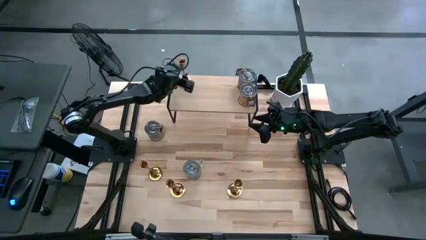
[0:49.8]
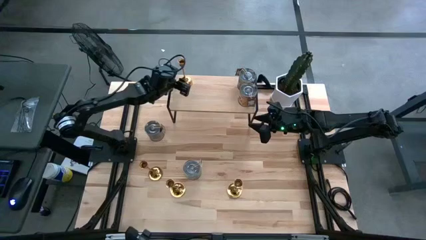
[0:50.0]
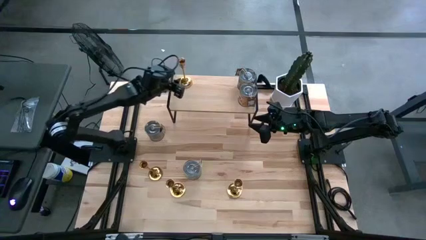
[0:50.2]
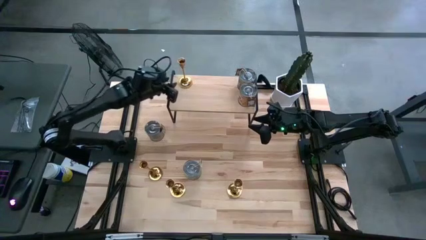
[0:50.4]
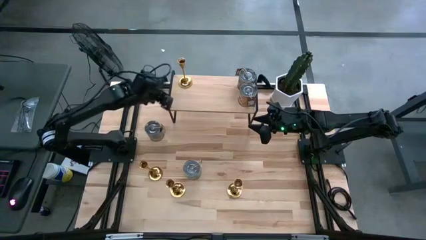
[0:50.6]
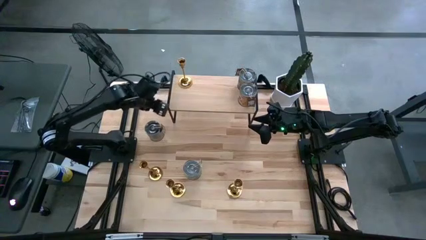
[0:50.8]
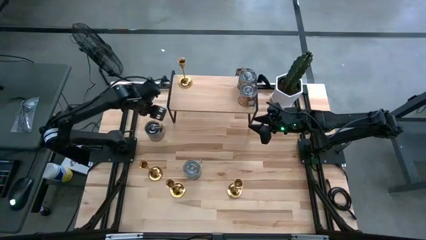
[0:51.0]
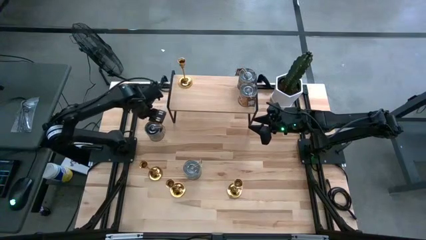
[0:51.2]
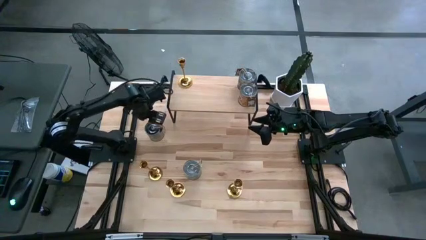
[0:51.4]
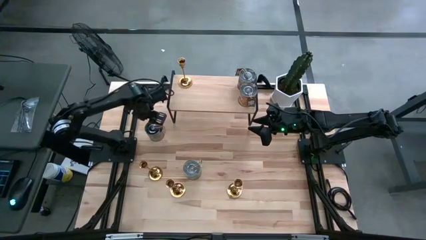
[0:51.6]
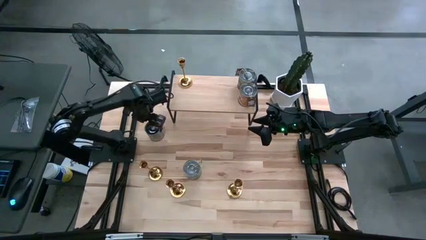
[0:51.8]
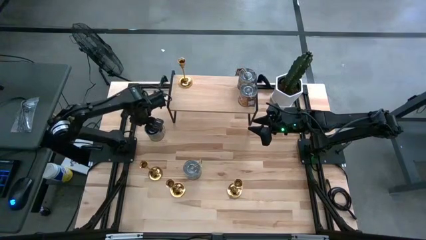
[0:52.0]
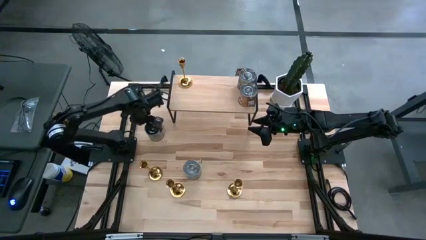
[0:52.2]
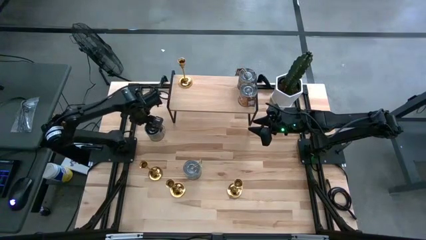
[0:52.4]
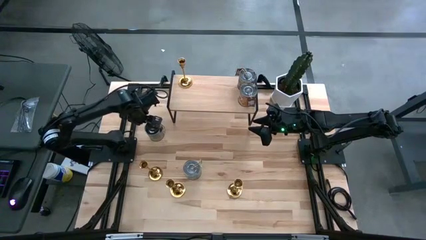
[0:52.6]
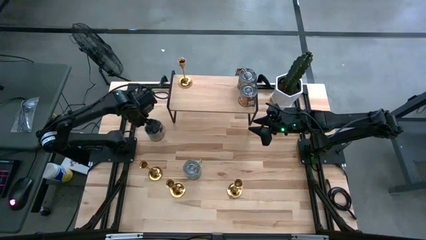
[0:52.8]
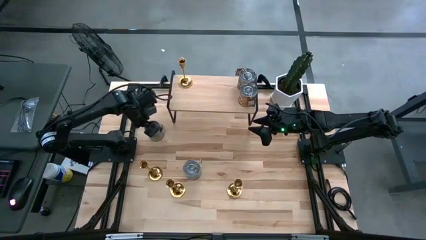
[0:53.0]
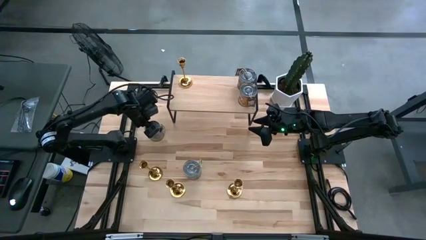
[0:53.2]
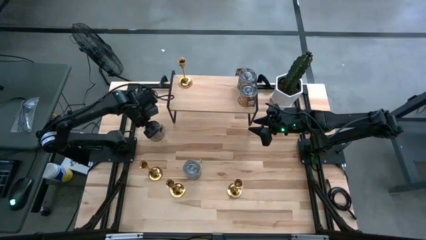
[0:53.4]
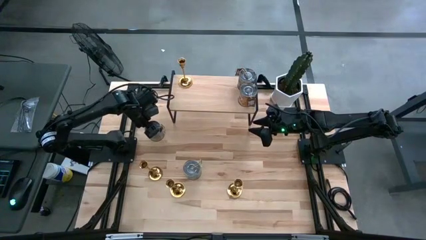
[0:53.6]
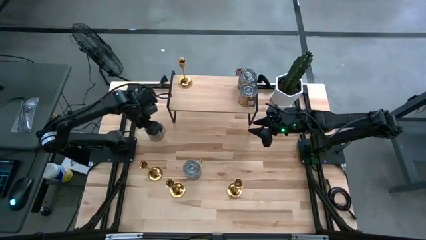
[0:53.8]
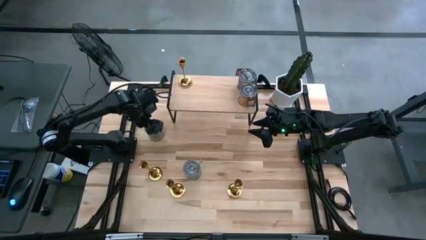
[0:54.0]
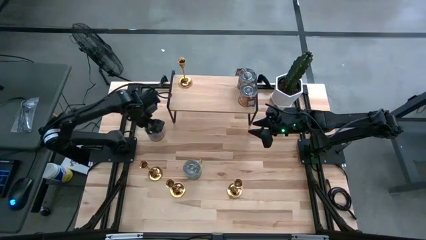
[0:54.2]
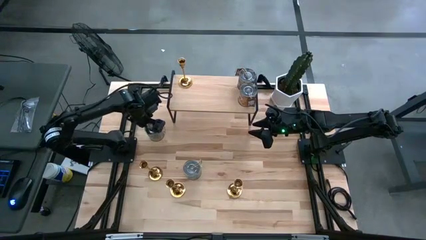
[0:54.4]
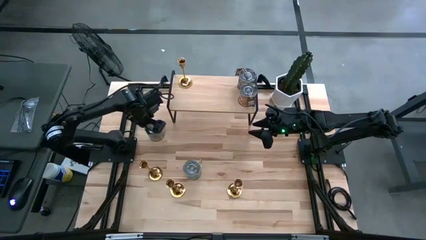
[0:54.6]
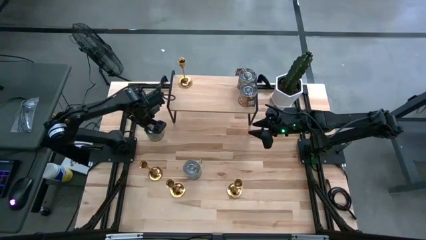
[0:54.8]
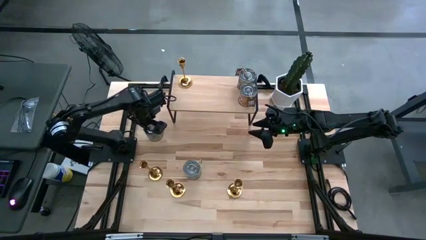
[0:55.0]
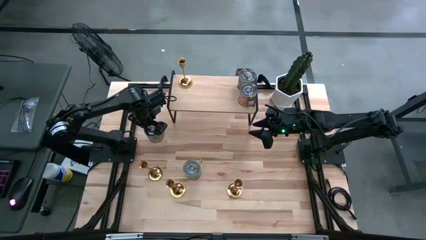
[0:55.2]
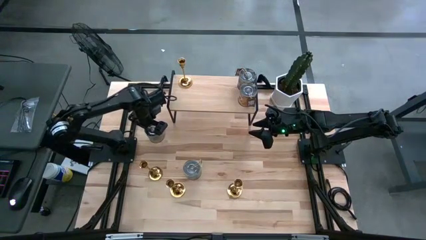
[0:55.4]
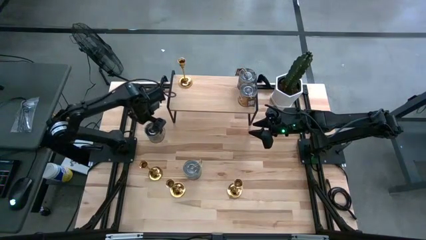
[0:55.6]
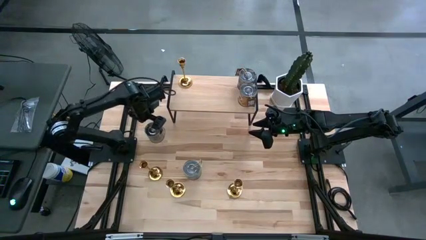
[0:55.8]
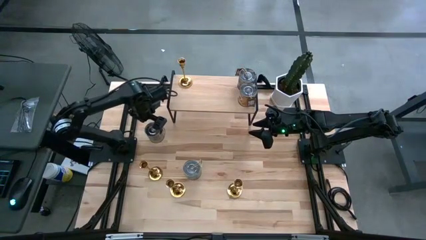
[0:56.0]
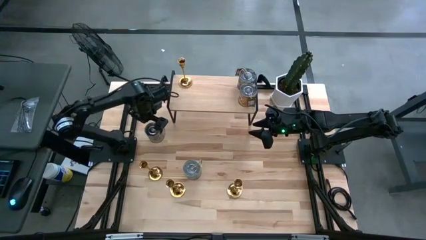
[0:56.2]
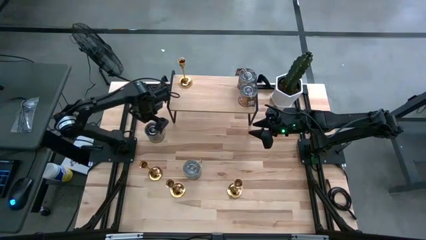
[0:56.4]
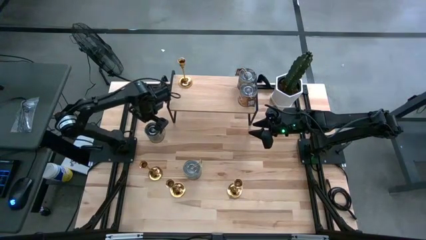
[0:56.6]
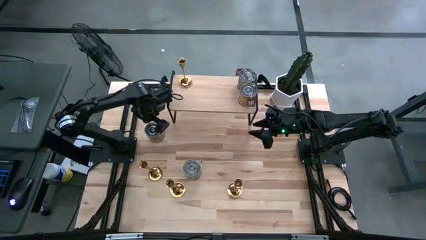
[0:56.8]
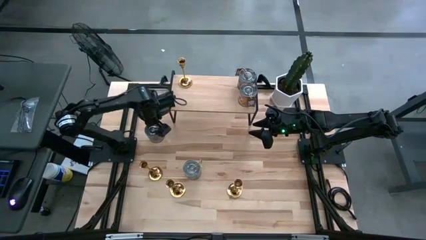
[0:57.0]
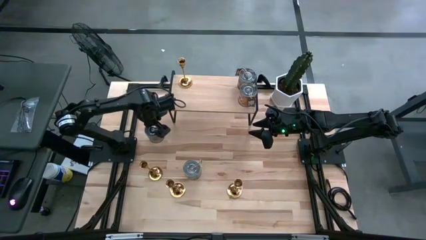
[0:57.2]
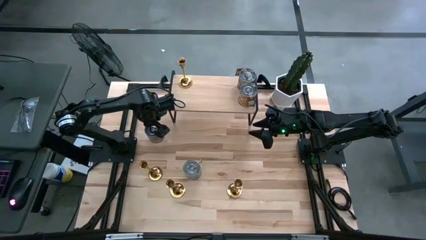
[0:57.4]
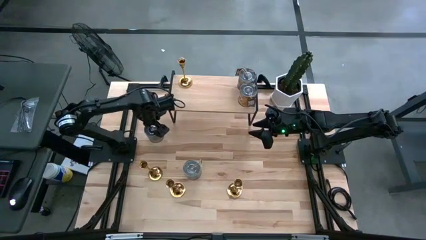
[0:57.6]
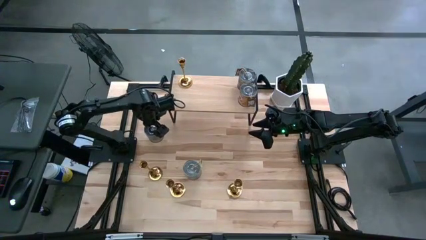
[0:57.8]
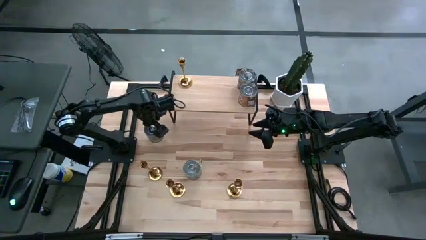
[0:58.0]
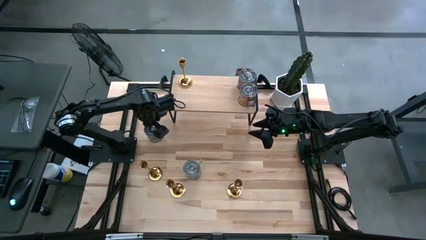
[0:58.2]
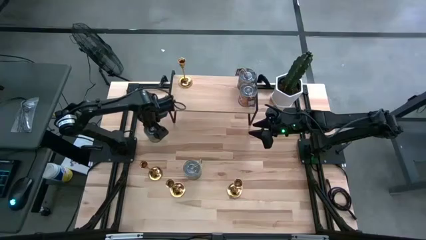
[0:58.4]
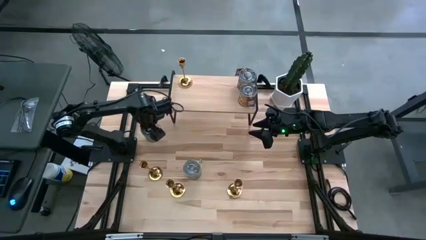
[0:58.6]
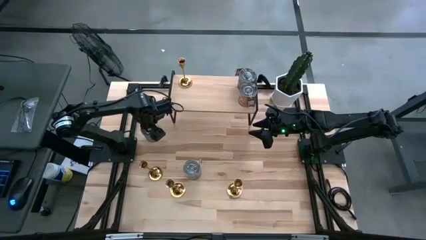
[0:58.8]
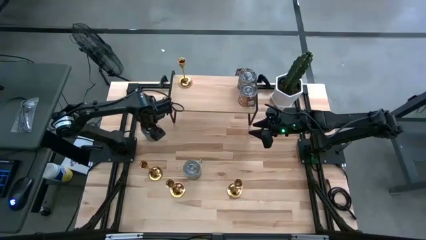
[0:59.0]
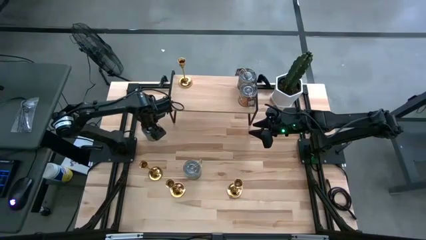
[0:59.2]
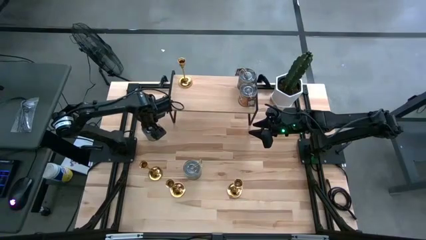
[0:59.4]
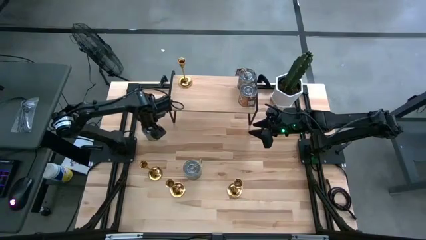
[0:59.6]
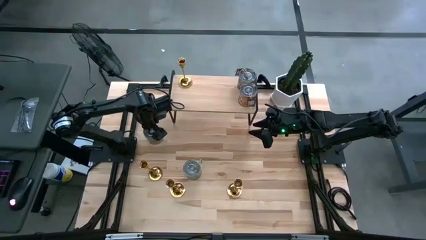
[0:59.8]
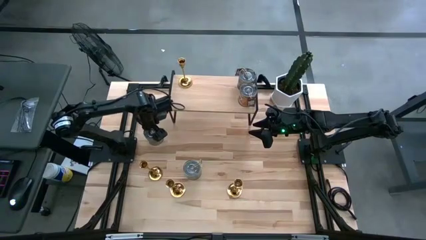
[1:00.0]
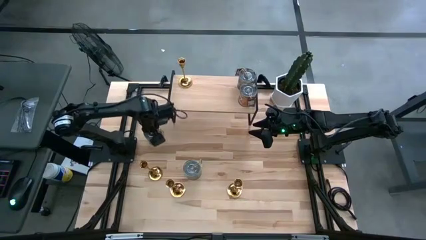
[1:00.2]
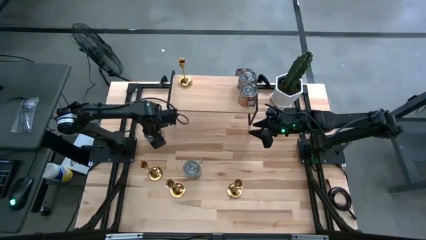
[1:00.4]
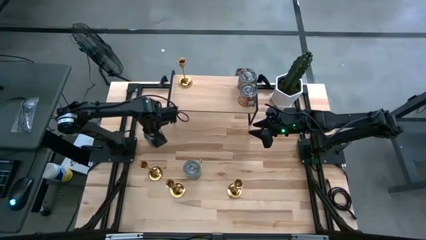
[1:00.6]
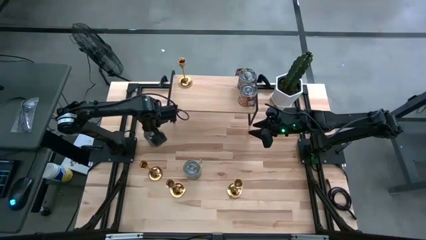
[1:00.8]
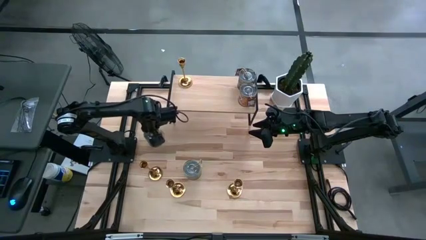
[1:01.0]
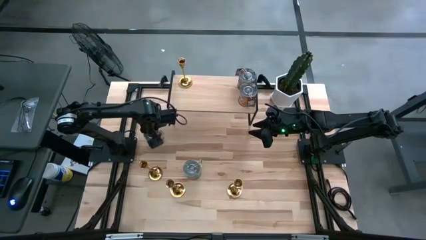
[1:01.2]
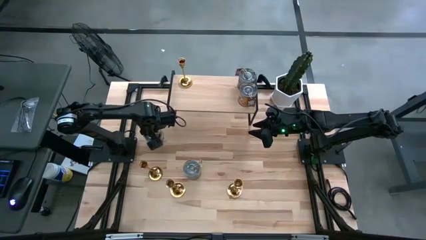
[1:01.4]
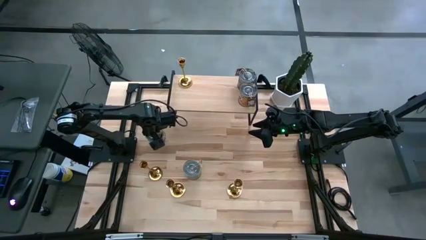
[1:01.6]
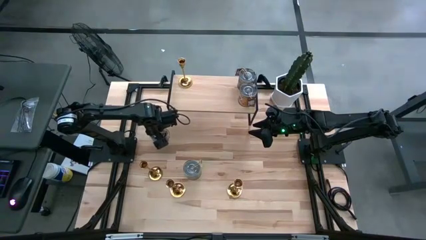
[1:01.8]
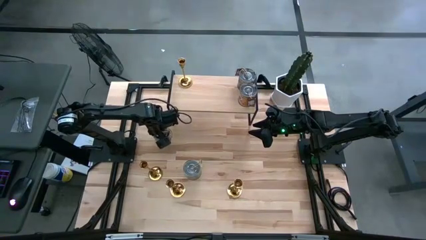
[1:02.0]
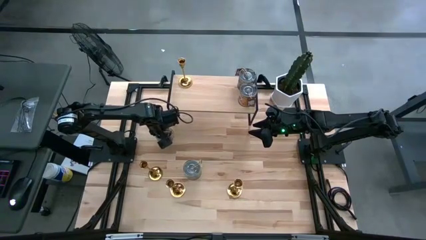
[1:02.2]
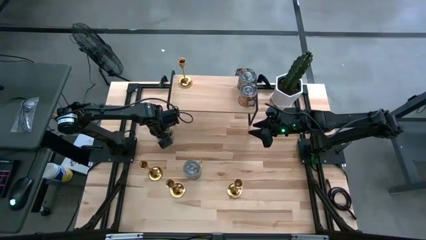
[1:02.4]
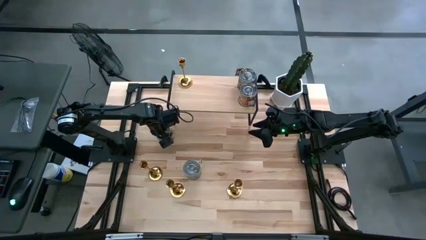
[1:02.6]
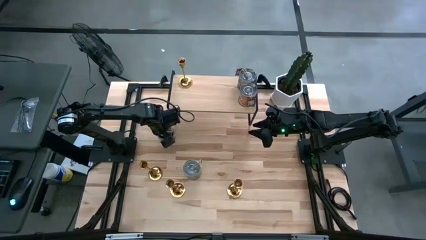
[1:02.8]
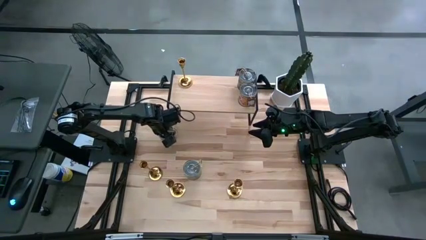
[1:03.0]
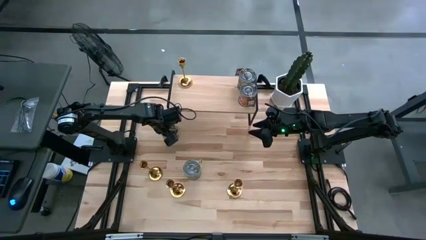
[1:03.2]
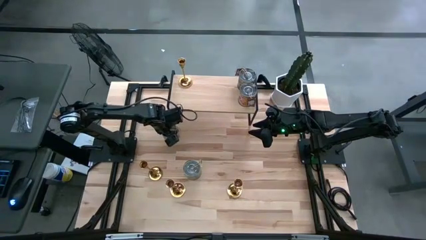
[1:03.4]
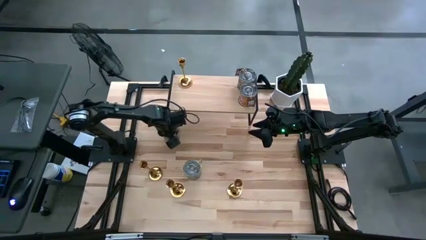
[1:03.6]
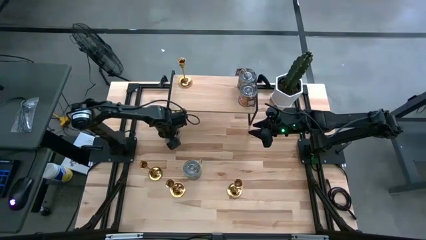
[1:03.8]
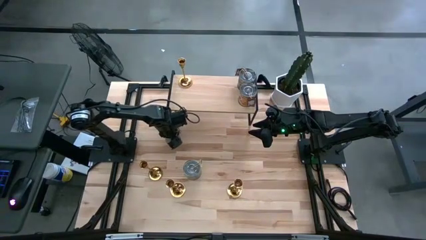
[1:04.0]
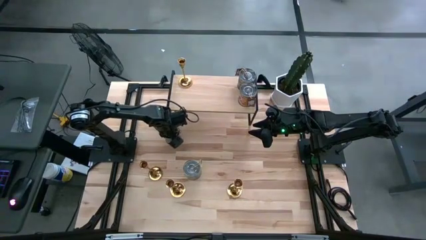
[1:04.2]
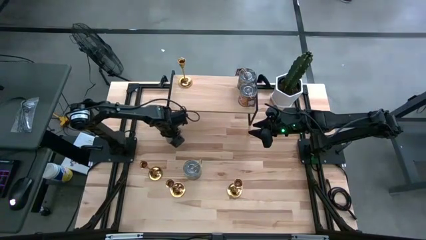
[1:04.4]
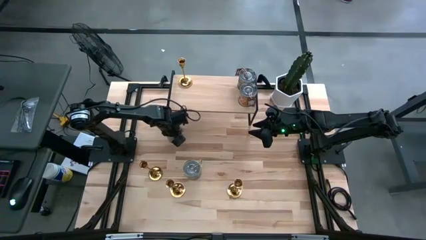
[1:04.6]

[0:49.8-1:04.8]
Task: Pick & Place candle stick holders
Put the silver scented candle on the shelf
